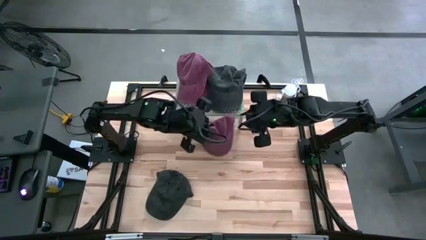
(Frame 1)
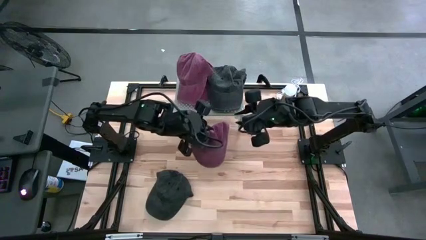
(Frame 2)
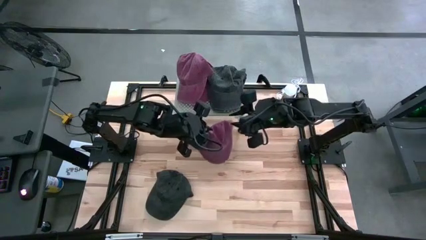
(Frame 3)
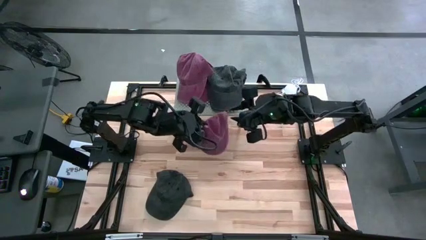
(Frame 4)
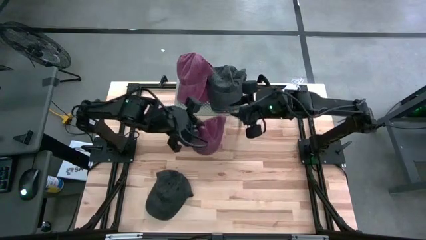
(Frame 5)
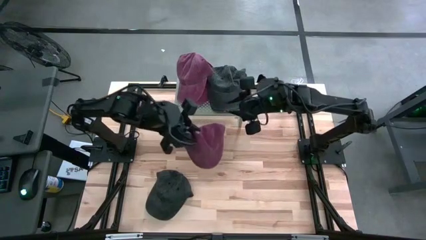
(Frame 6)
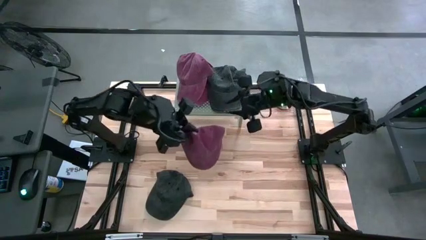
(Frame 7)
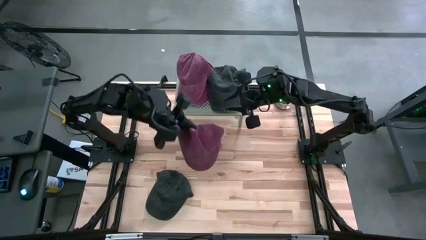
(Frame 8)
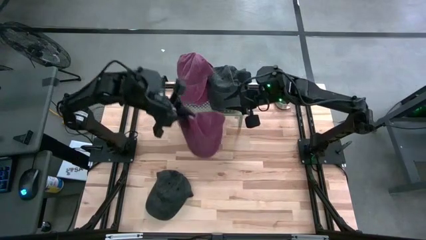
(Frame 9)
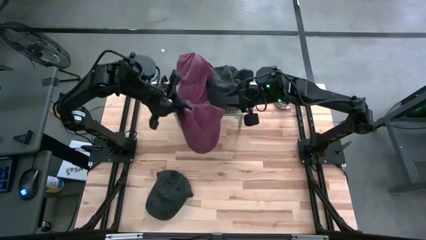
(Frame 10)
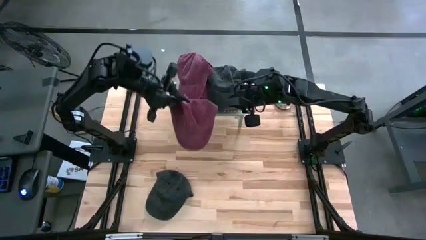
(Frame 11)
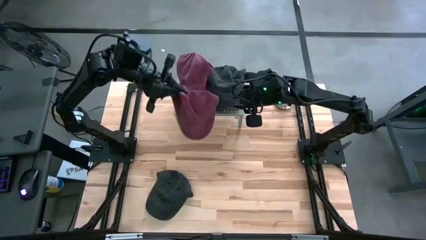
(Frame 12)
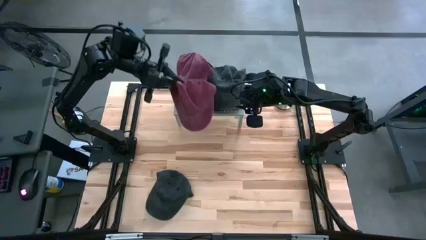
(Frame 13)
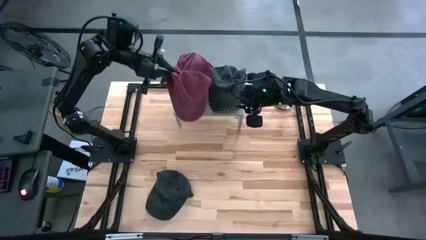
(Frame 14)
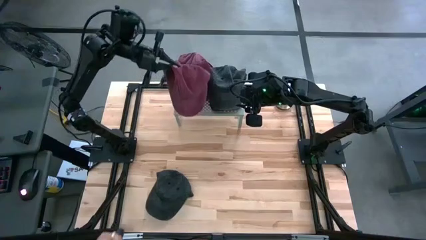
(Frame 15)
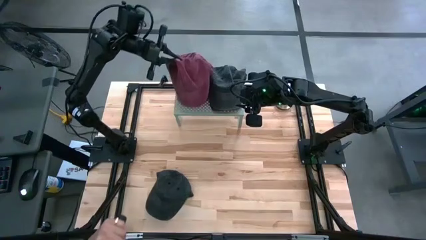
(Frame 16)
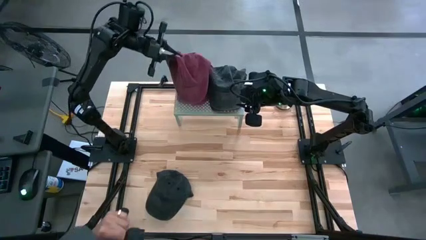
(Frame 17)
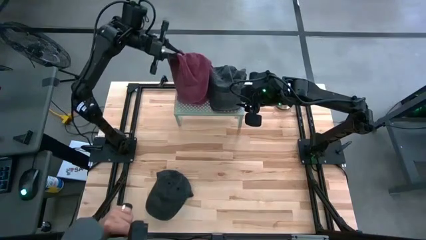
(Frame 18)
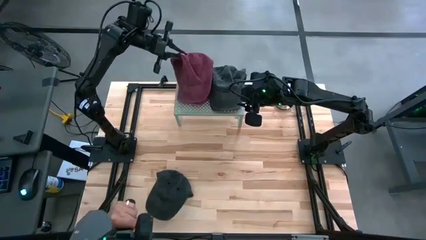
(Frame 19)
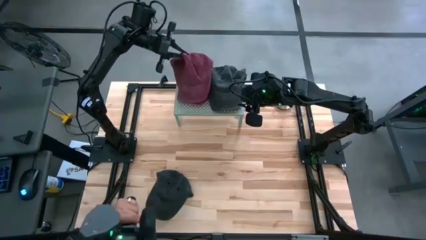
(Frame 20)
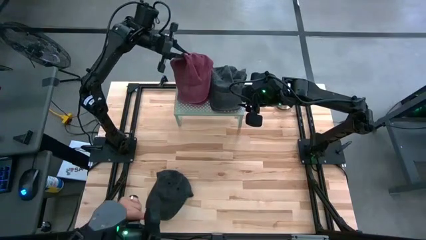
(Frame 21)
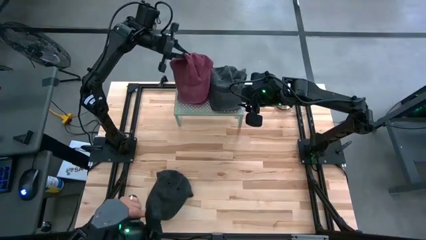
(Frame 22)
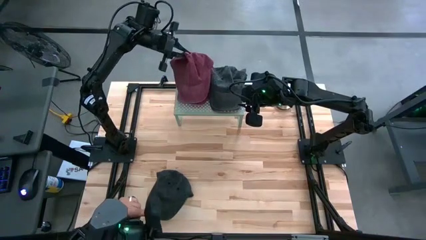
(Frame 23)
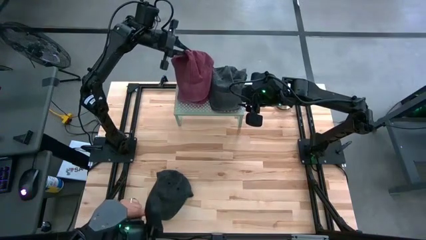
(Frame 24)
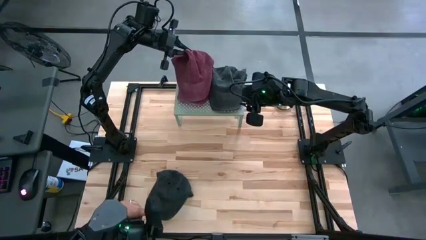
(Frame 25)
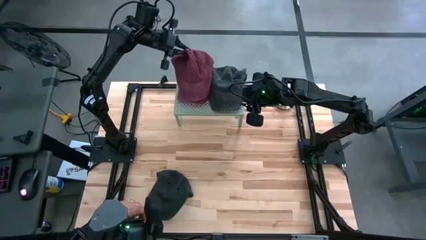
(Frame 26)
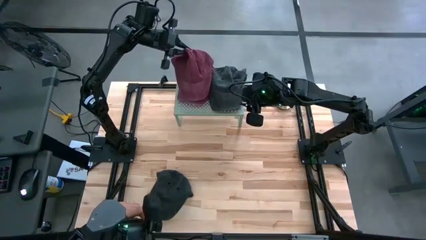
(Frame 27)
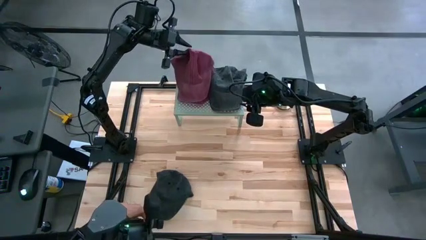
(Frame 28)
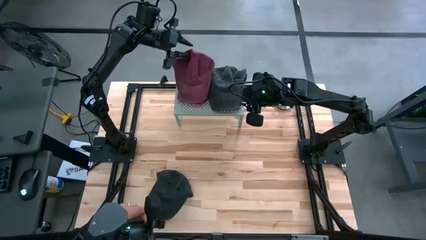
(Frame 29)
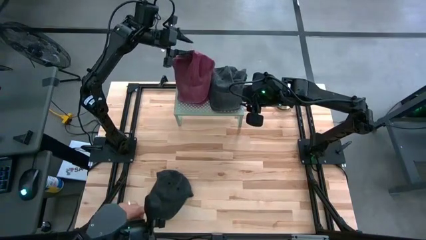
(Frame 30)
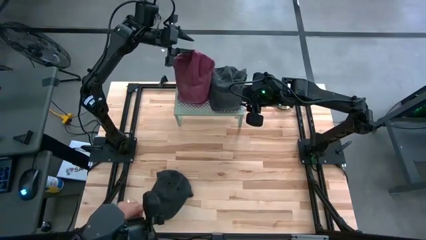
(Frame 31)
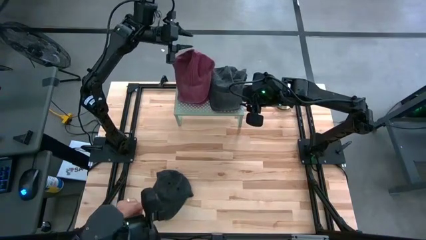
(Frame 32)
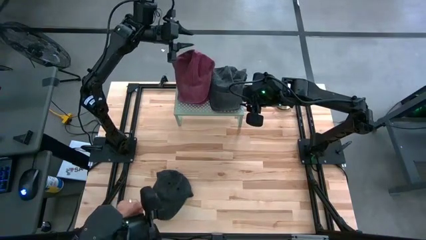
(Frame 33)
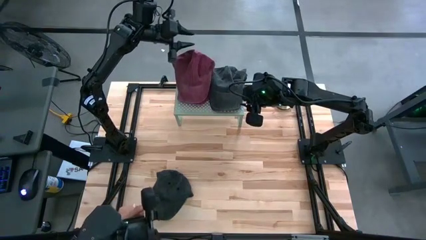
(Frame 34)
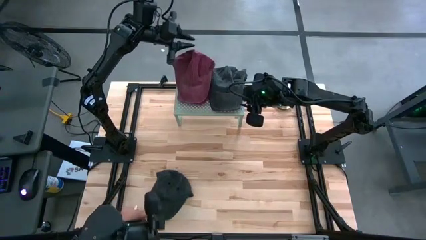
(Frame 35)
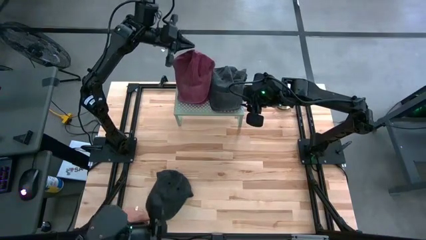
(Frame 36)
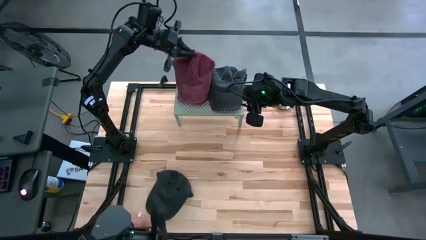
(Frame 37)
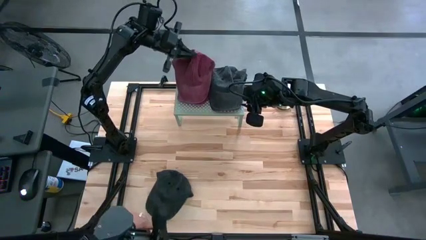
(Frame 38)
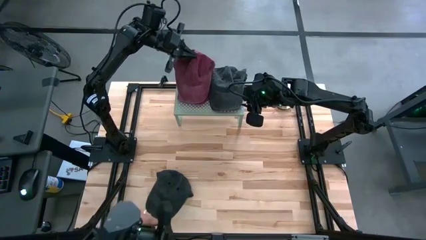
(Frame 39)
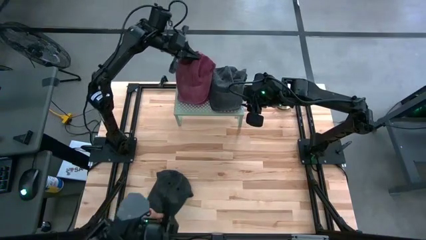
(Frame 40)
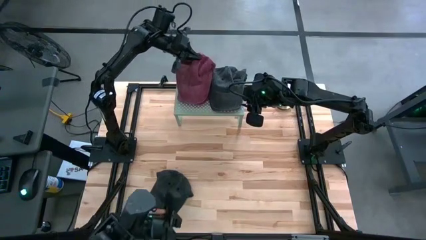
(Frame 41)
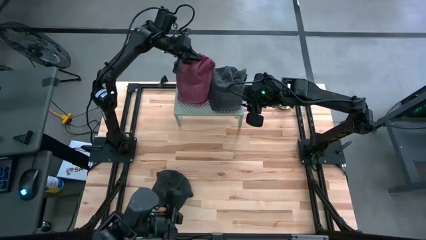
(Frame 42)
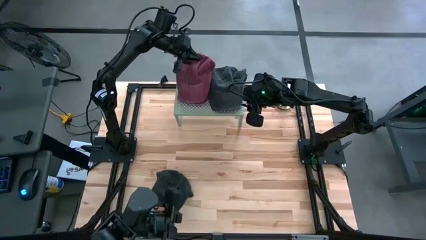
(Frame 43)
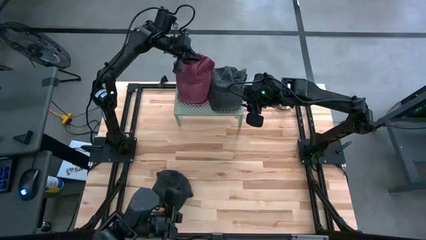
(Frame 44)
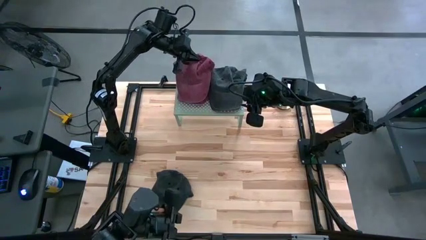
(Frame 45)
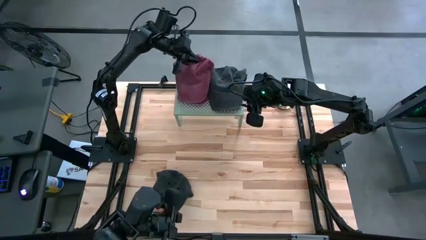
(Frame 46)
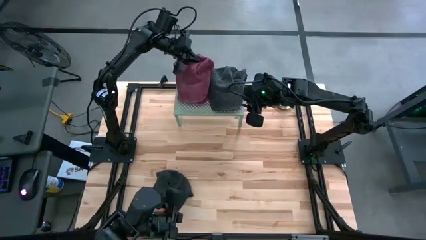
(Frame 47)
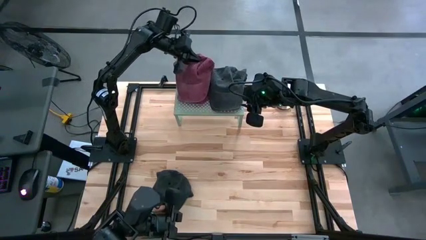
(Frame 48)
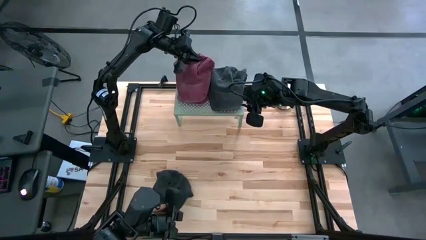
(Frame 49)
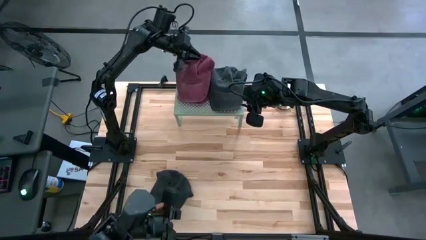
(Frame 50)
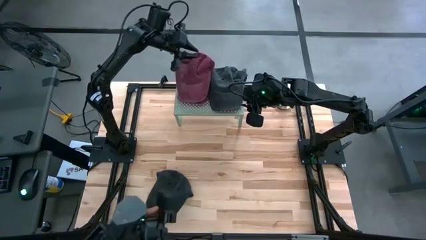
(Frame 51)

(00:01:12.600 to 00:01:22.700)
Task: Pick & Place hat
Stack the red caps on top of the red cap on the shelf

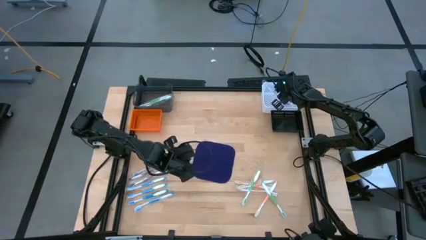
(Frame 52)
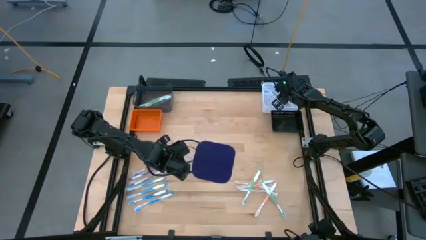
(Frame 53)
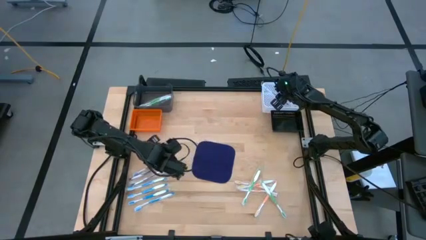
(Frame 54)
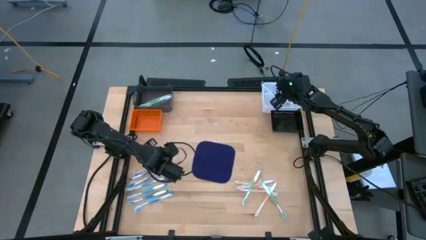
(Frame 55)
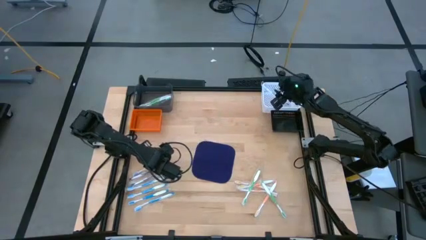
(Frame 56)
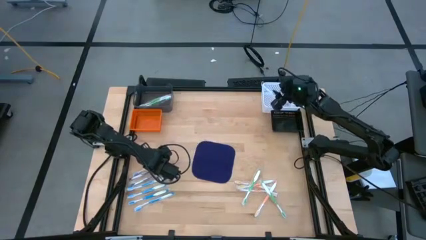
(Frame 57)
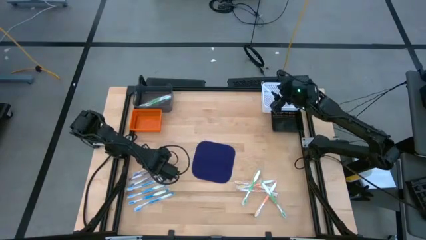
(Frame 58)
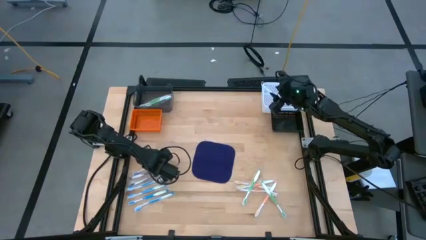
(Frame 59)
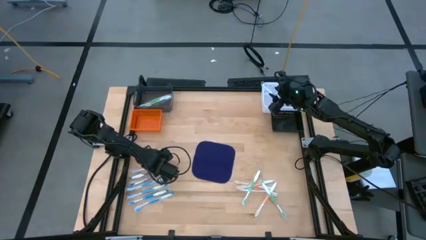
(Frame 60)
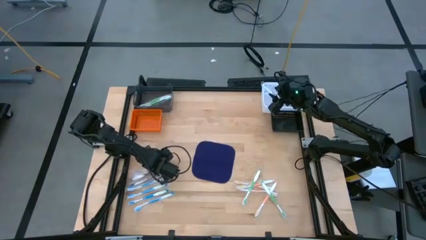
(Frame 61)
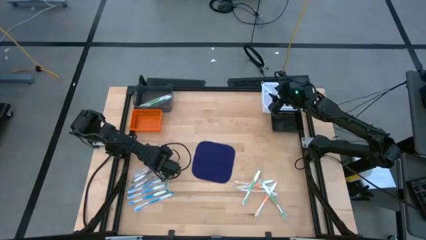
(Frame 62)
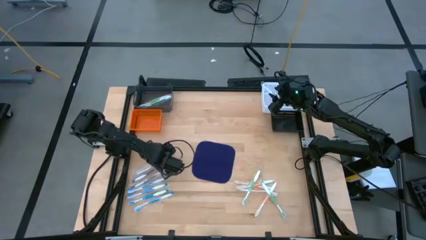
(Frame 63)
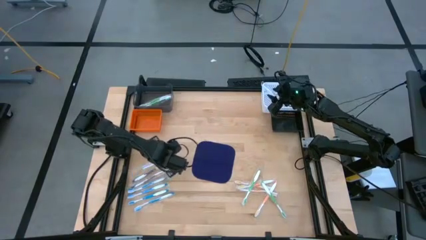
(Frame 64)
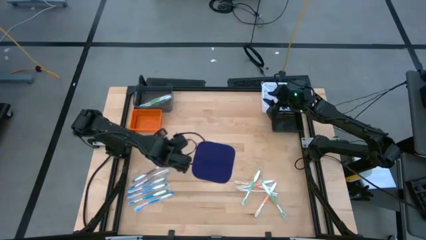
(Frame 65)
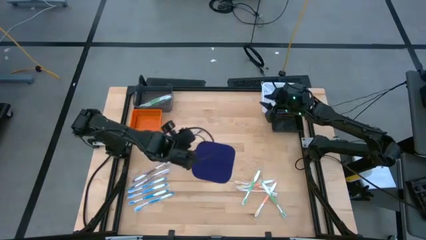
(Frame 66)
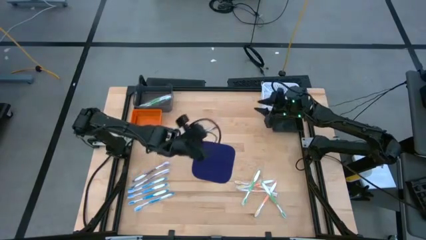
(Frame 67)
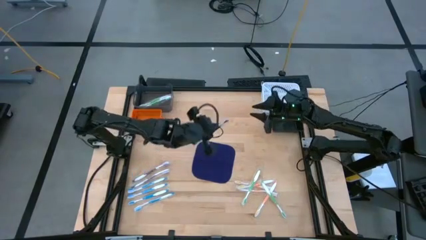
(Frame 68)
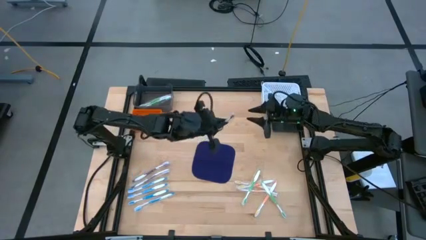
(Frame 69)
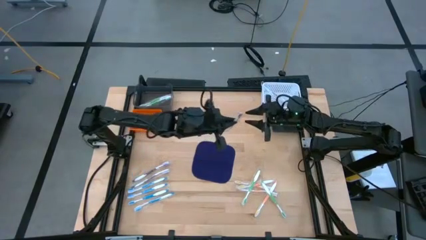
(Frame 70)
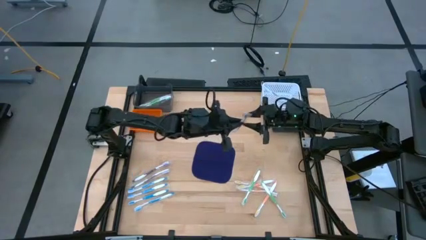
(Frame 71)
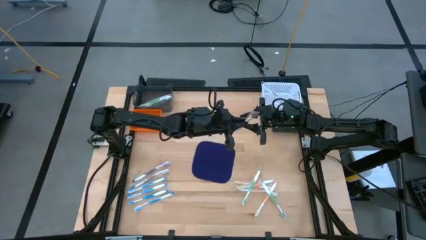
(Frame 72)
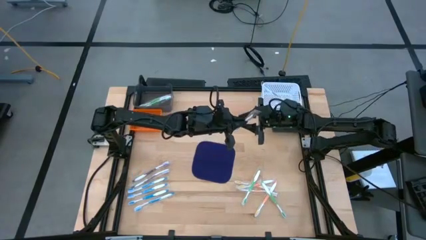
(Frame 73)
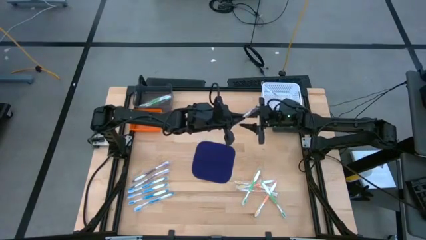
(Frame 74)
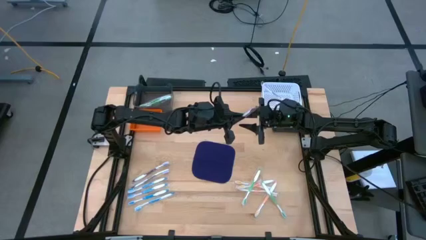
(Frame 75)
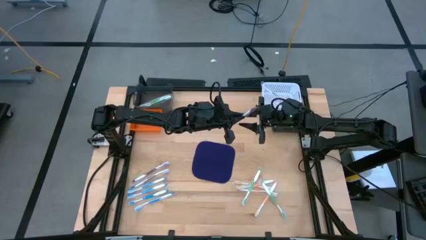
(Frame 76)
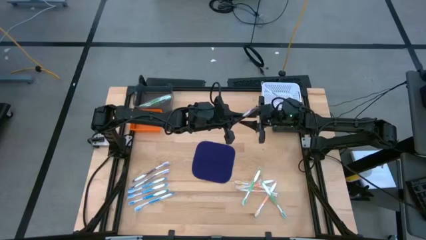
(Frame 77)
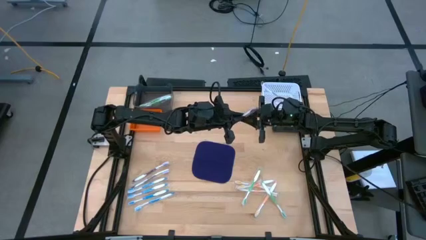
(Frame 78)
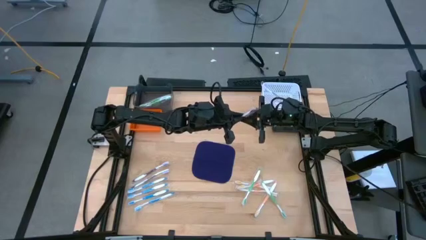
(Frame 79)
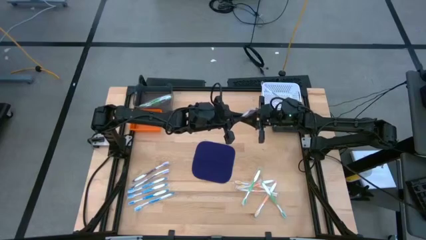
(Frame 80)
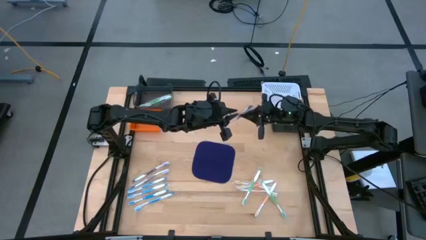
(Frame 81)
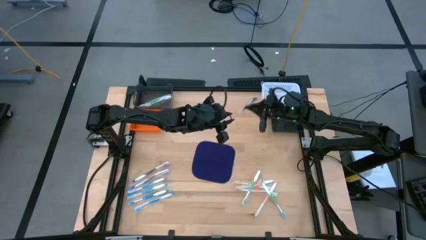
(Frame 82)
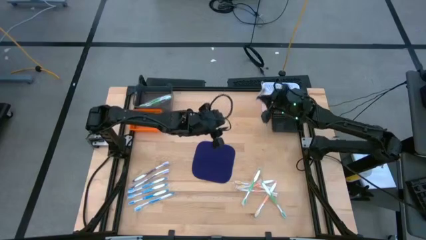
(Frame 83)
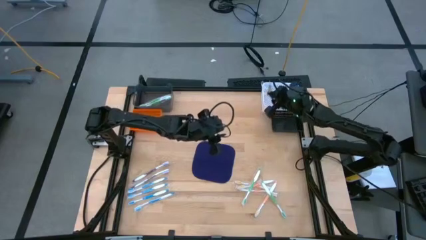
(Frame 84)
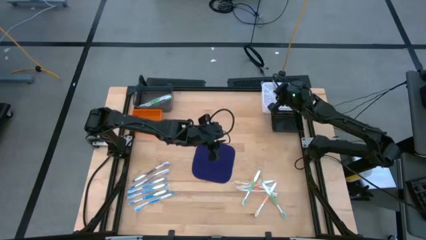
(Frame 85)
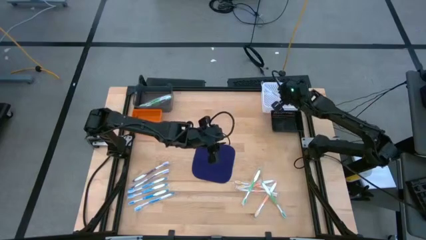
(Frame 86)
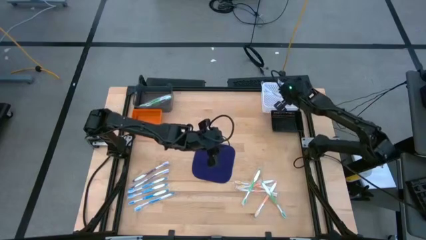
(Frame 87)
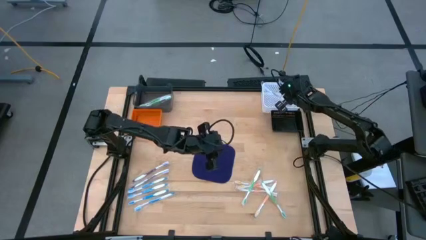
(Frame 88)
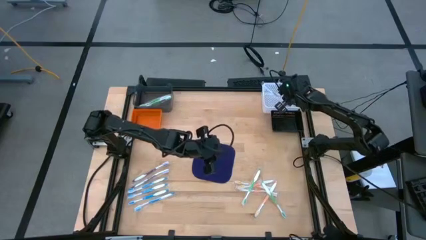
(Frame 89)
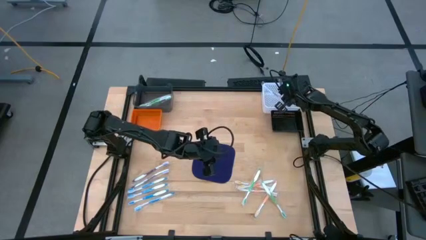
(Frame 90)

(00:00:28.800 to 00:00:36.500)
Task: Pick & Place Toothbrushes
Put the purple toothbrush into the white bin
